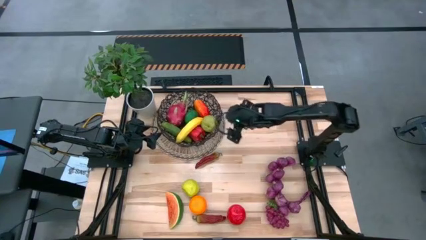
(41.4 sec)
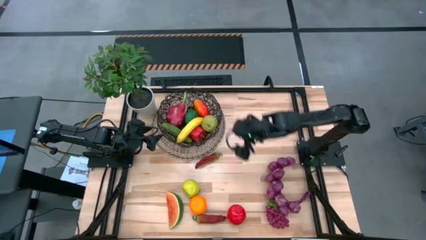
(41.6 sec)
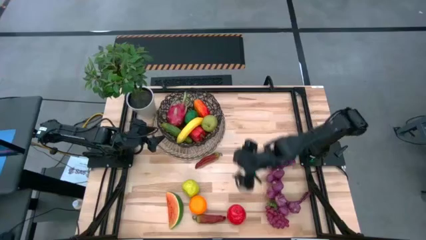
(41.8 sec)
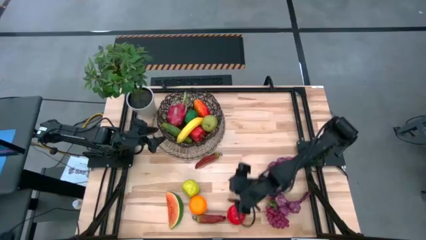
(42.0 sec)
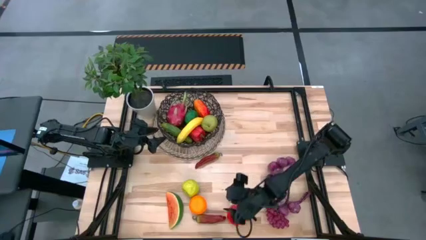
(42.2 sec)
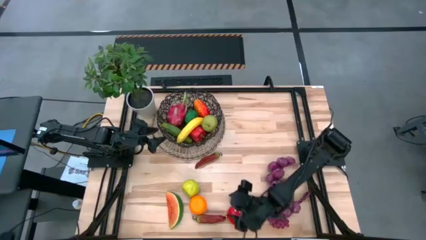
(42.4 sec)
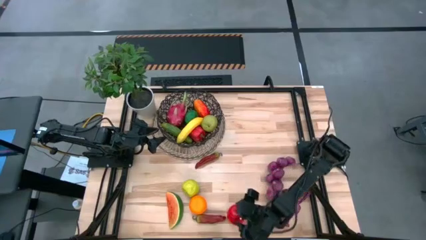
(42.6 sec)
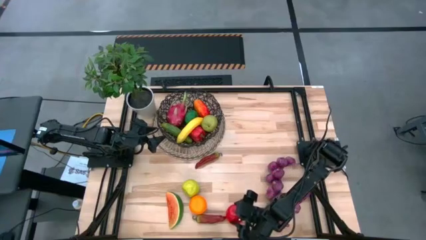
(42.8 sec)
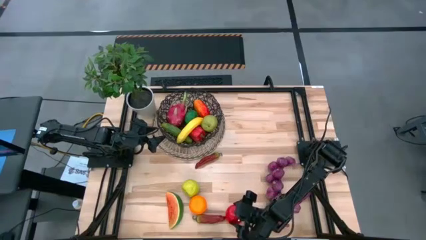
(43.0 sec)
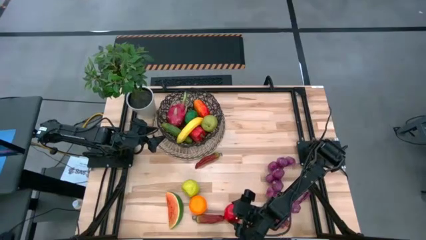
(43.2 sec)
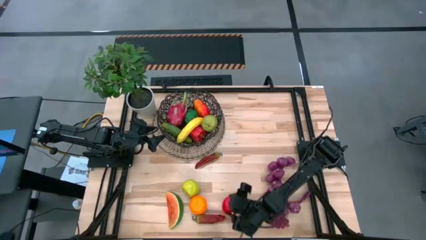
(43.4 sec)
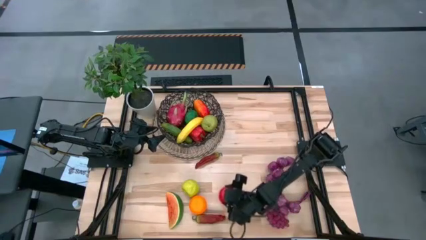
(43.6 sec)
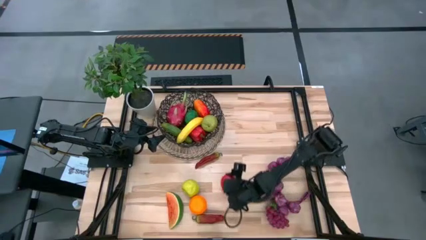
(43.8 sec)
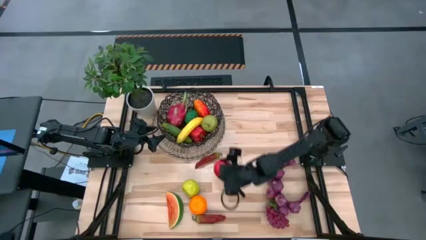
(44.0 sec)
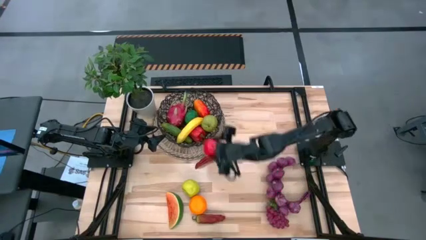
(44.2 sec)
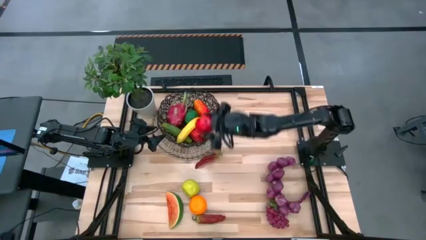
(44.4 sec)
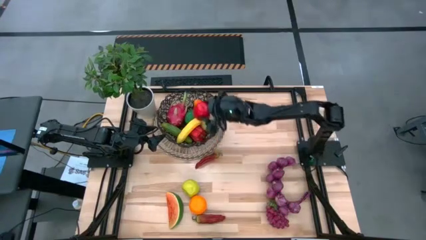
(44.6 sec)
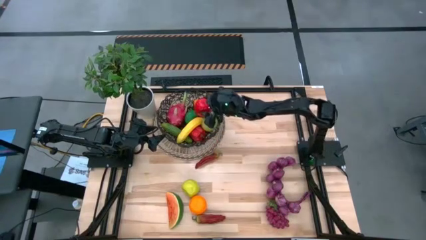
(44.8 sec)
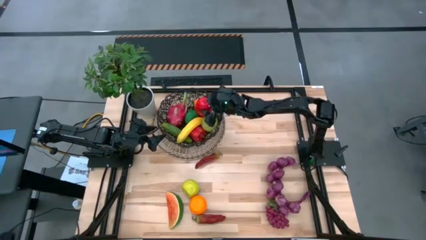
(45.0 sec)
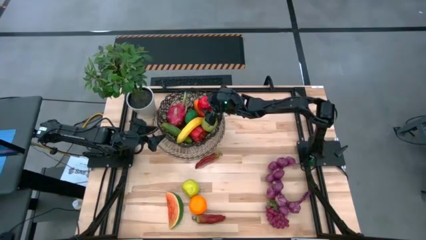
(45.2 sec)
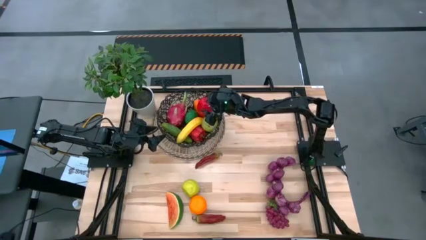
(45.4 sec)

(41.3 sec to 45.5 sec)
Task: Build produce basket
Put the red apple into the wire basket

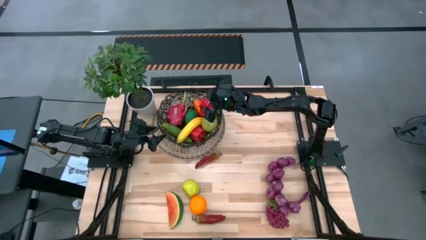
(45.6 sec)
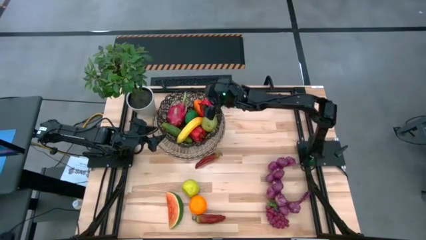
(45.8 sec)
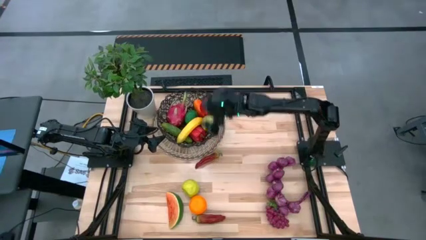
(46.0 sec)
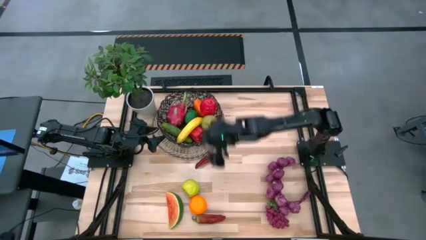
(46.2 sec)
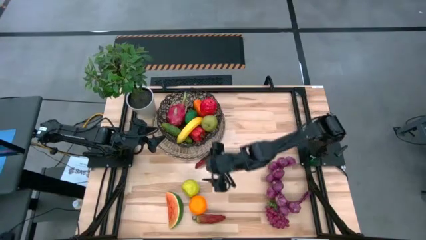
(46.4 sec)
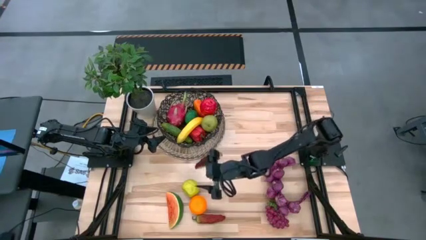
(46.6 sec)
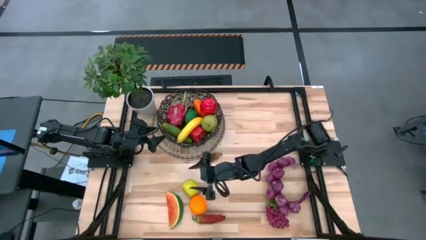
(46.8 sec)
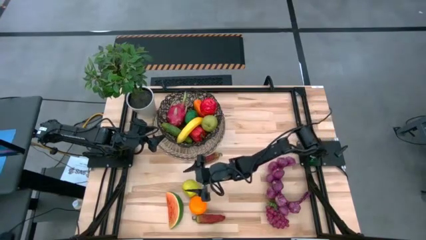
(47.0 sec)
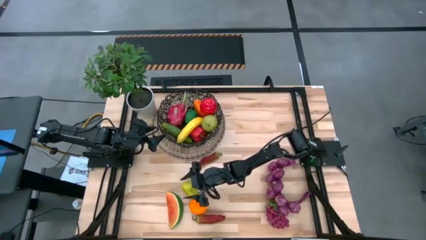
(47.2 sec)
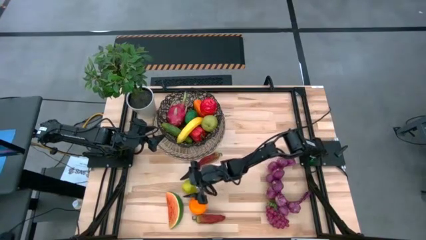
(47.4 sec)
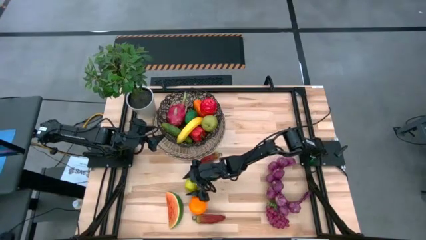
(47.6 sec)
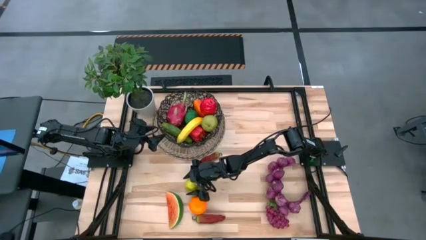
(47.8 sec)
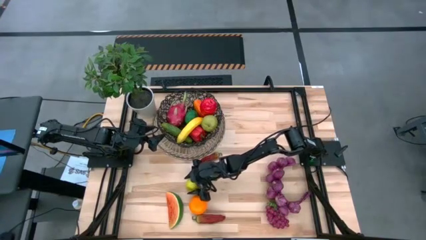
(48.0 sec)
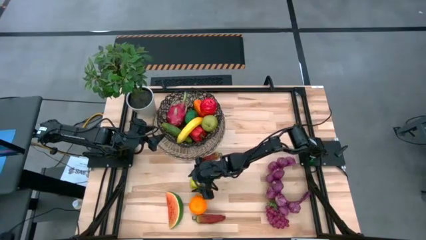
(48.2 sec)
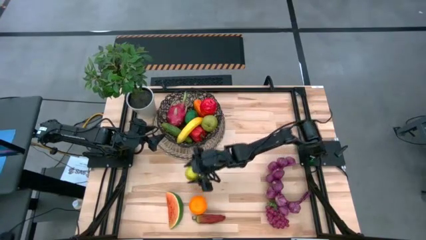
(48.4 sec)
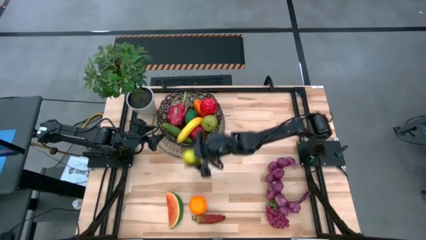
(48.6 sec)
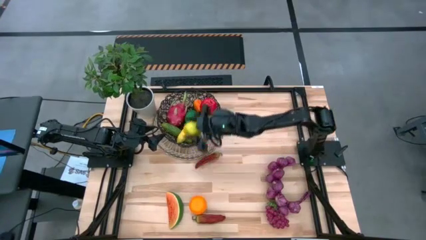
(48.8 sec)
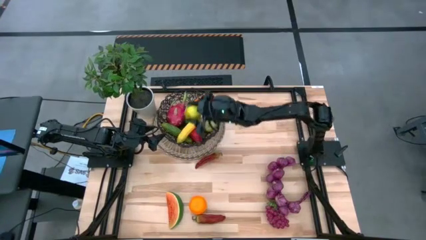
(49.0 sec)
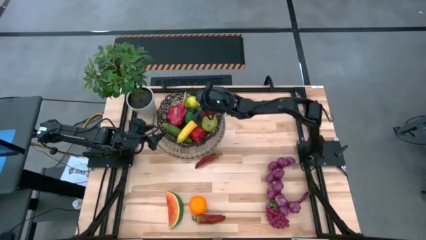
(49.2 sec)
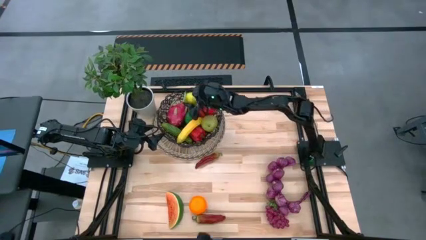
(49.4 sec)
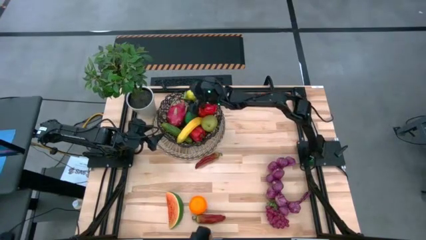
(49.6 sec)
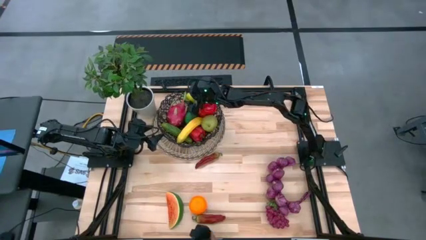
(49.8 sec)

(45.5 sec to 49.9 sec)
Put the green apple into the wire basket

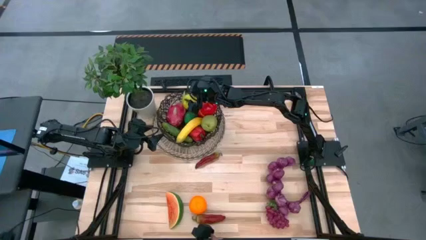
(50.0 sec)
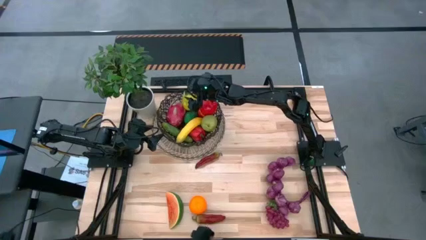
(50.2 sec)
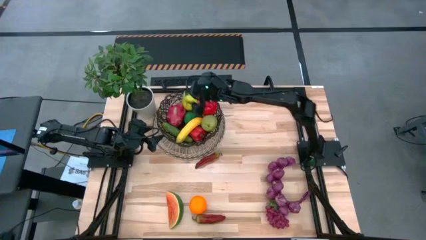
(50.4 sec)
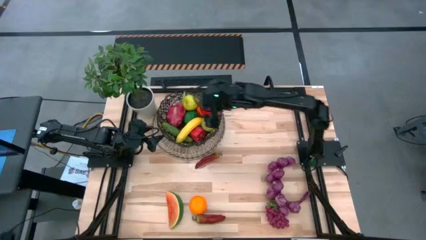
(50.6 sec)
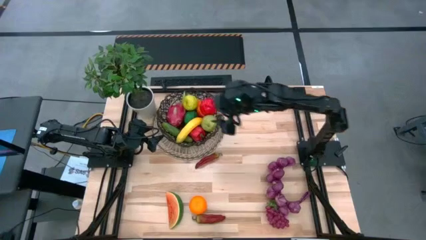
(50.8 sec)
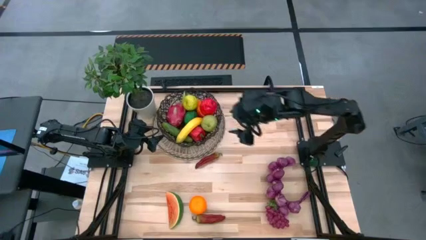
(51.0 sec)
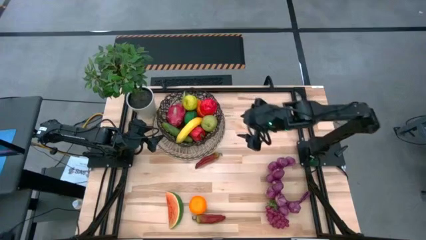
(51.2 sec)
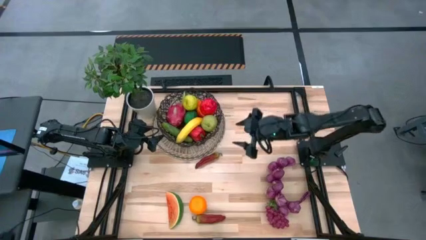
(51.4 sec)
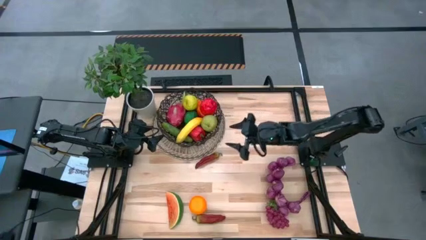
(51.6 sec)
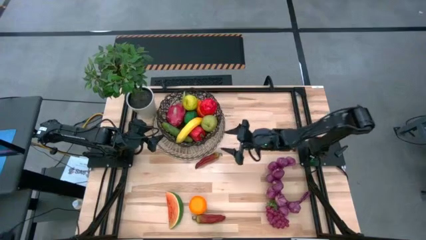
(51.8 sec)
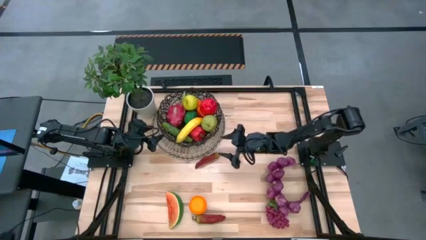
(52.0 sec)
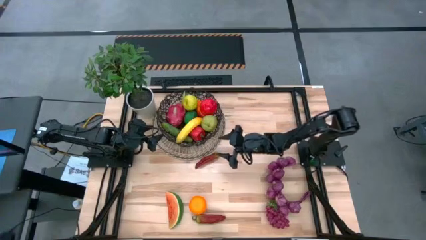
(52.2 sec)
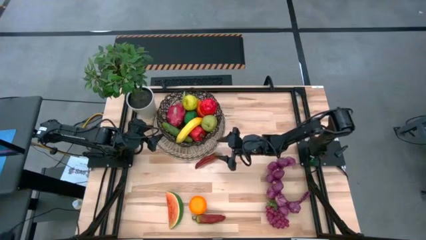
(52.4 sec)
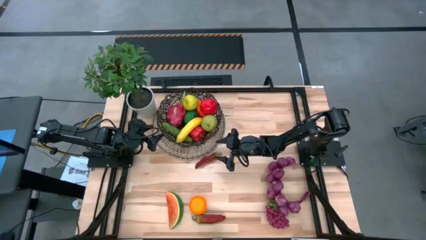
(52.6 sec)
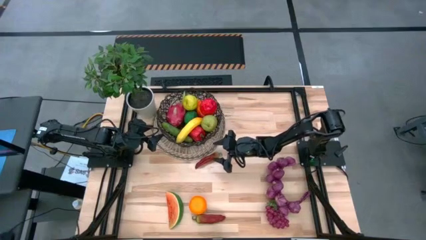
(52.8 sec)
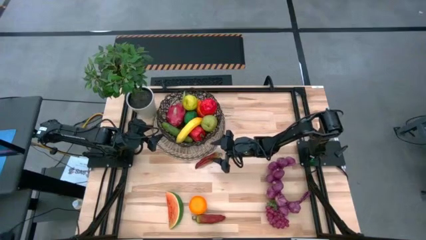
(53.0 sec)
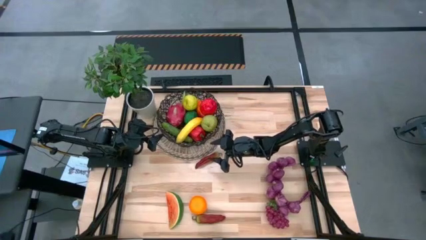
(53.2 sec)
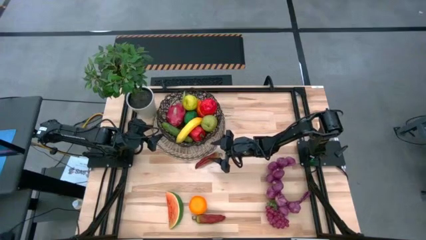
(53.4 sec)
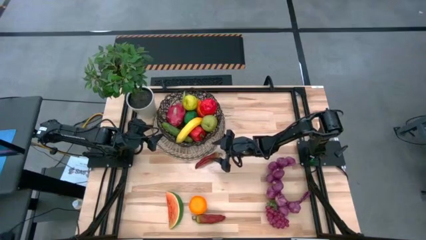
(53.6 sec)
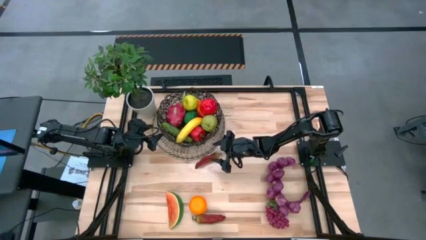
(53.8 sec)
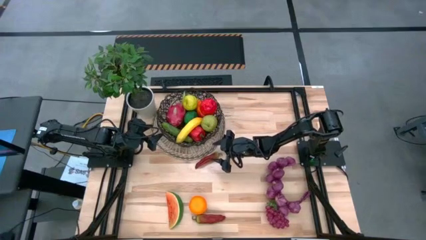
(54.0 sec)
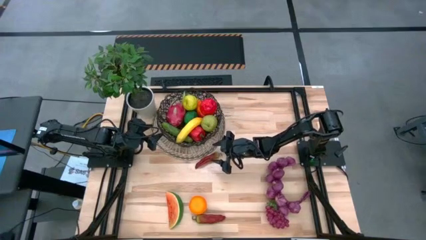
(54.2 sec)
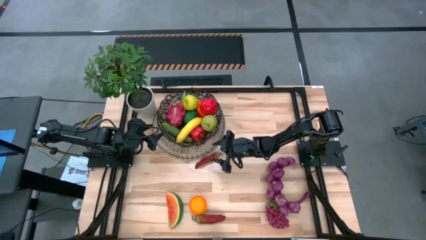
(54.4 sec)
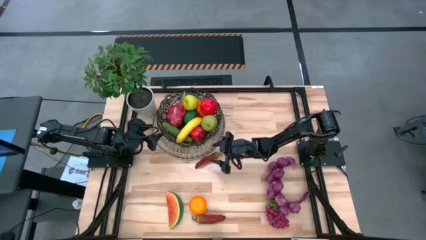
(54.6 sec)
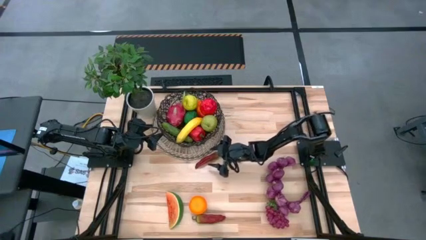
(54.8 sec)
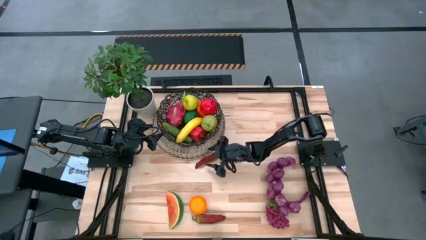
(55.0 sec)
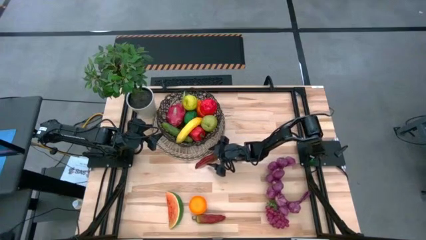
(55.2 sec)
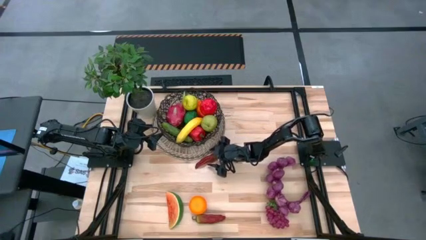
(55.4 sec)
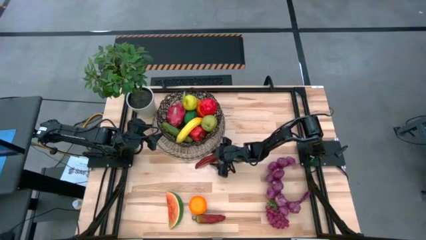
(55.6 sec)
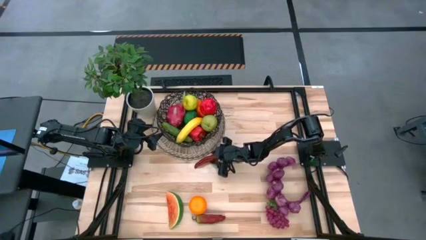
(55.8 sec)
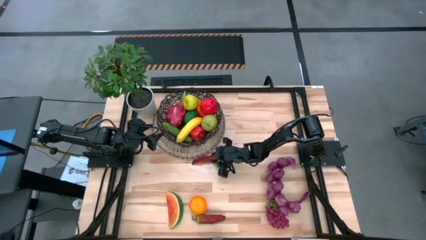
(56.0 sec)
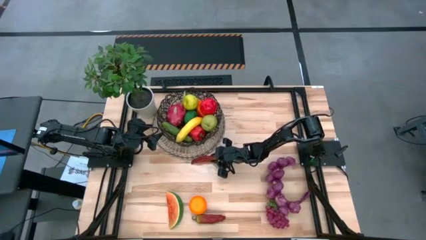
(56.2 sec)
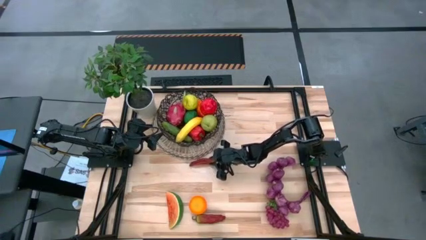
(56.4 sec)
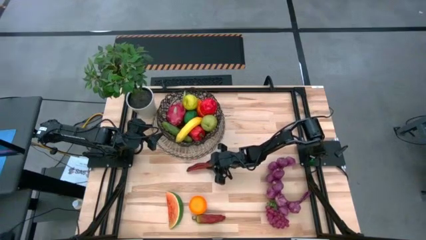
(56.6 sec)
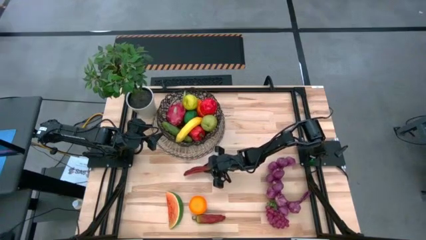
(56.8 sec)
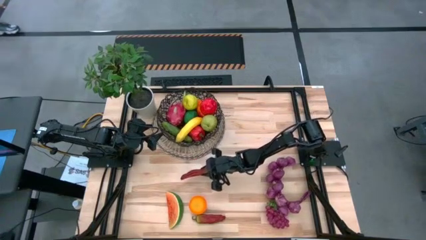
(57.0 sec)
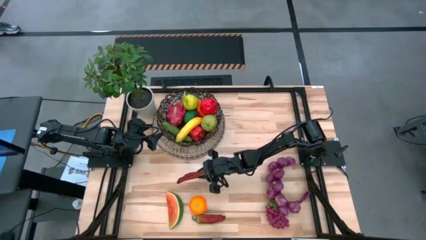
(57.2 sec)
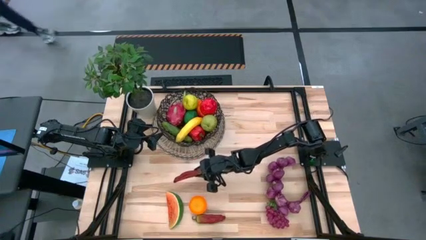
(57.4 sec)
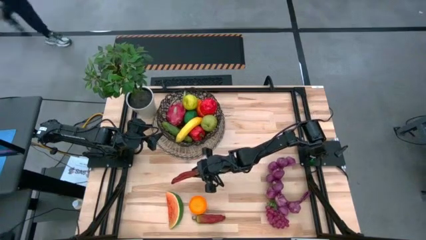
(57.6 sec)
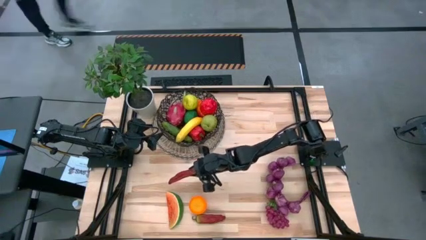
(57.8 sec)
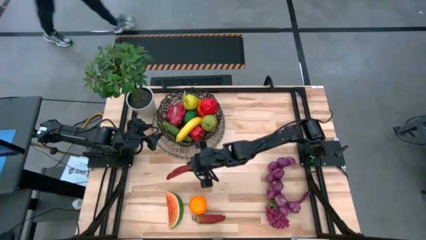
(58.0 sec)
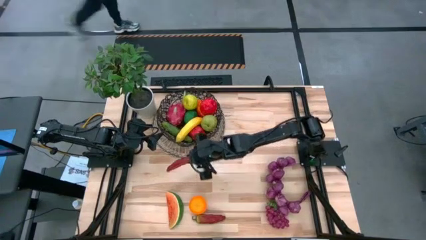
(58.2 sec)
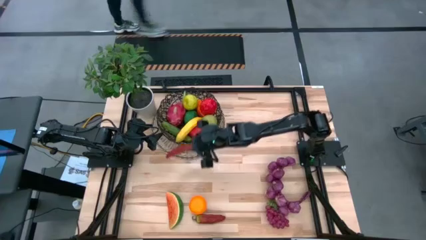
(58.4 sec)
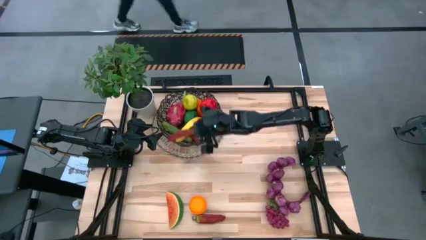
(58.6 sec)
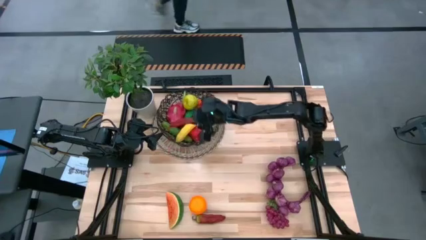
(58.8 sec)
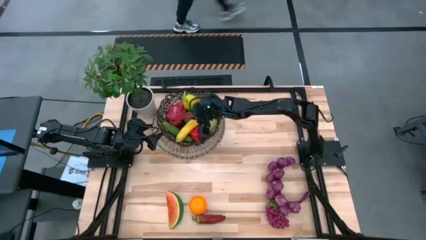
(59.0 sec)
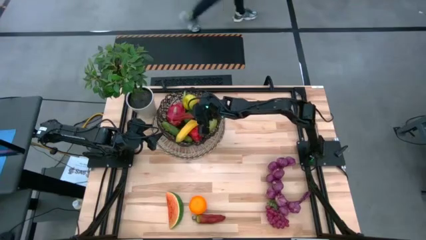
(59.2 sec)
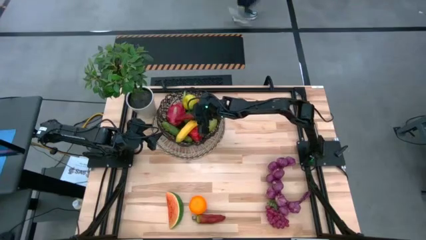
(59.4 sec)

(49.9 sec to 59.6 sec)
Put the top red chili pepper into the wire basket
